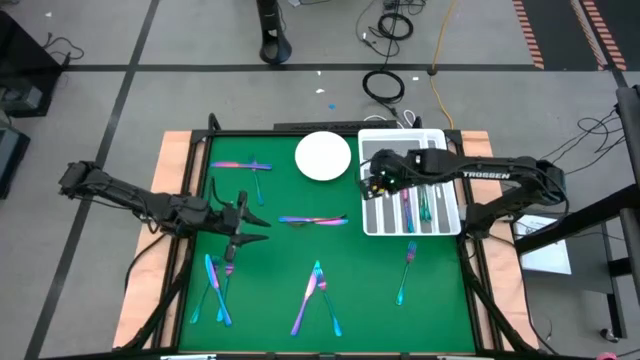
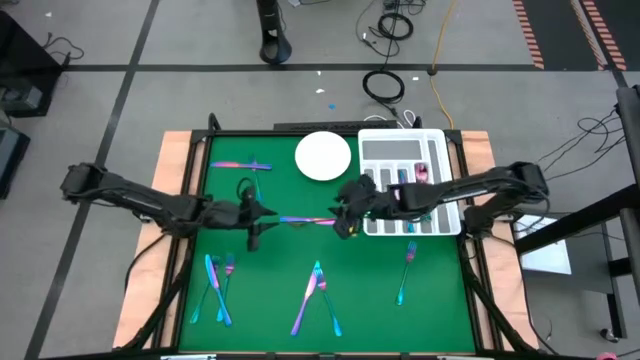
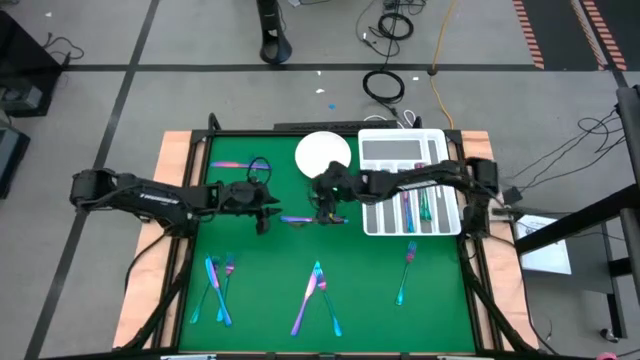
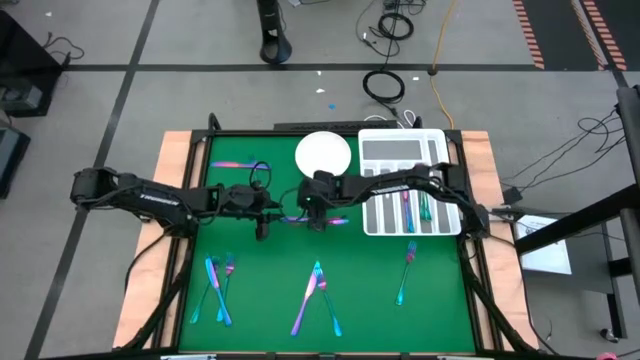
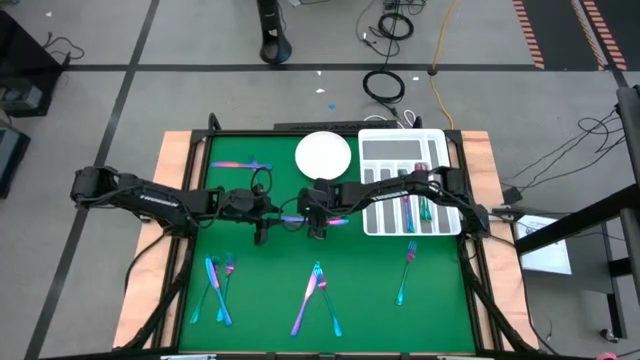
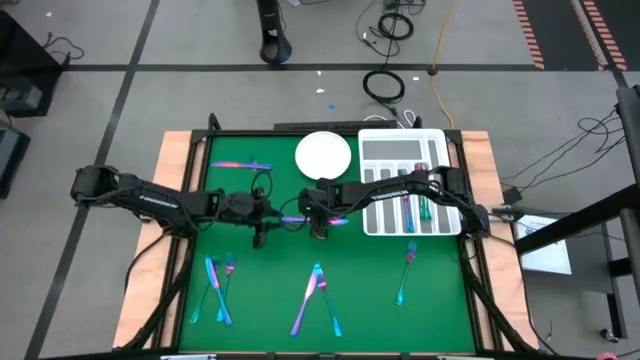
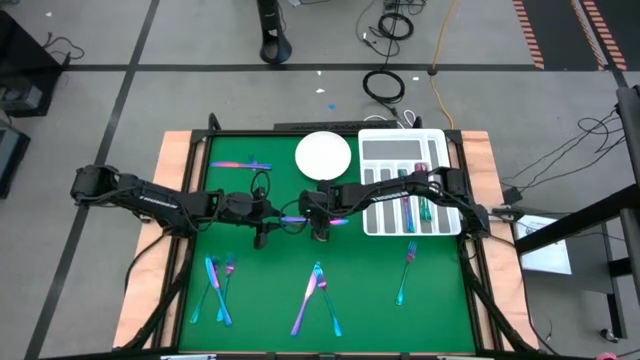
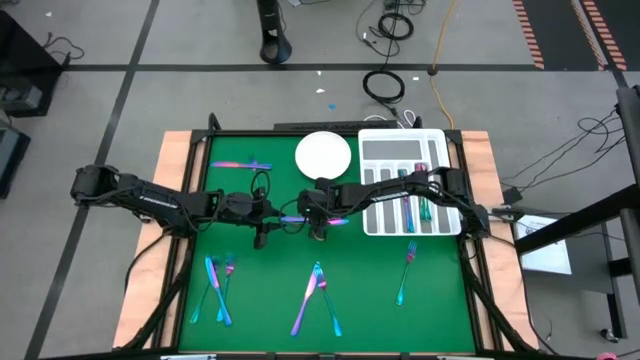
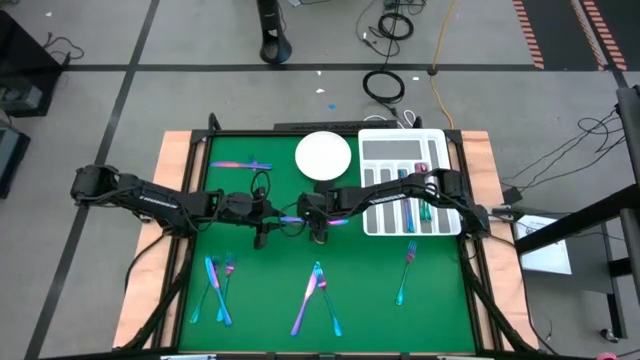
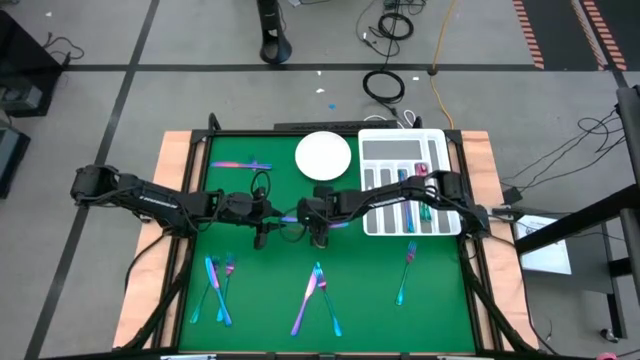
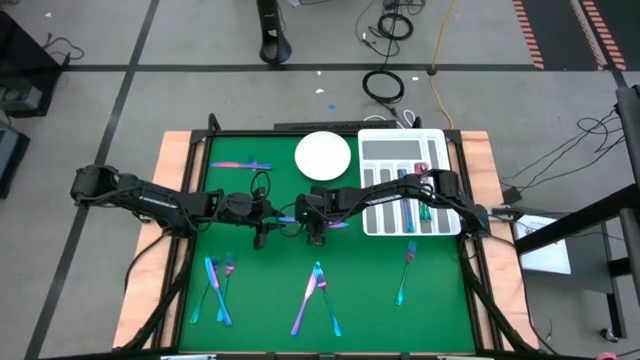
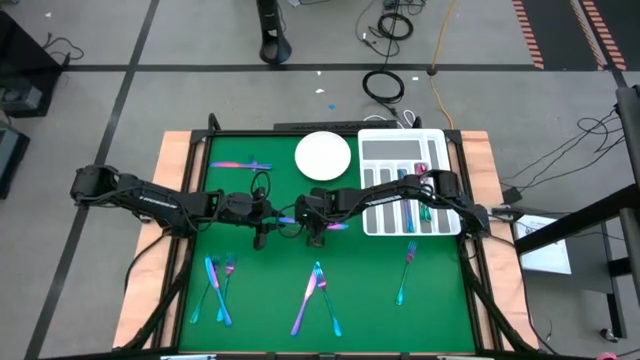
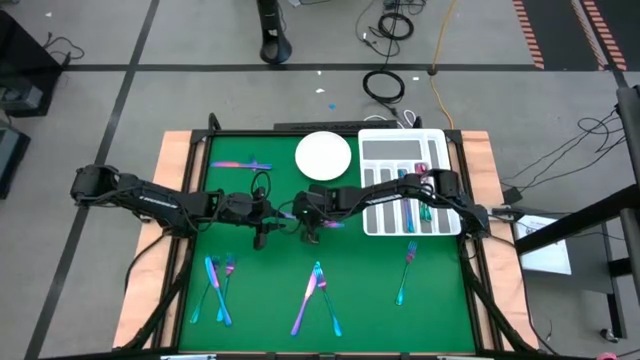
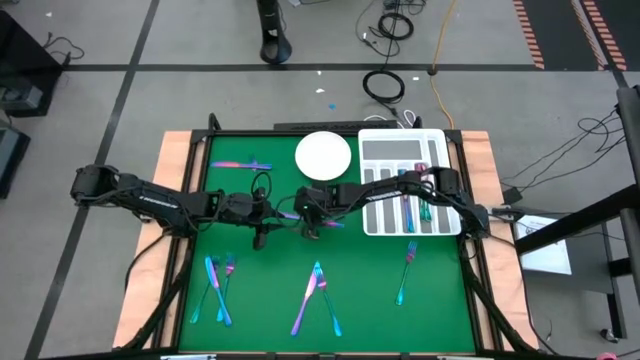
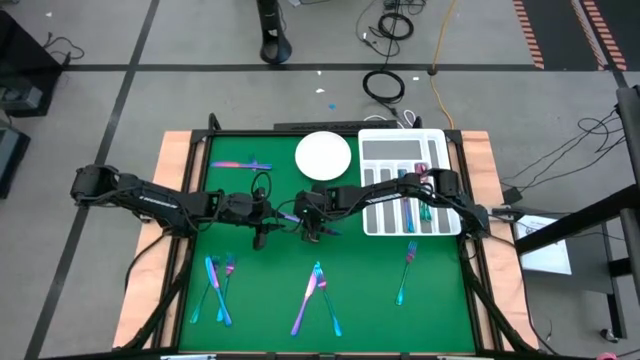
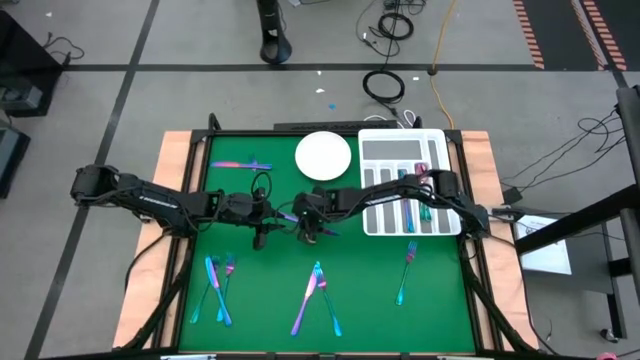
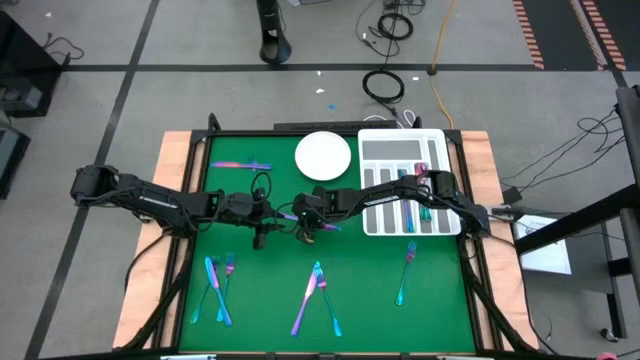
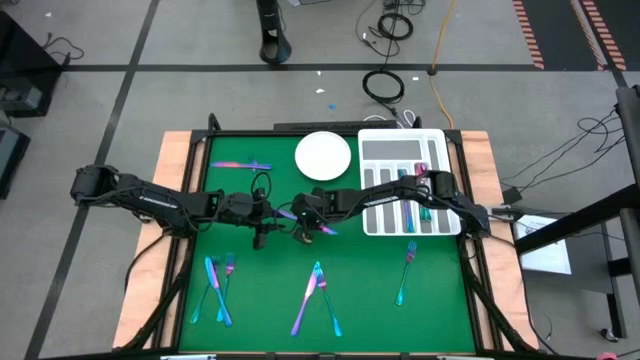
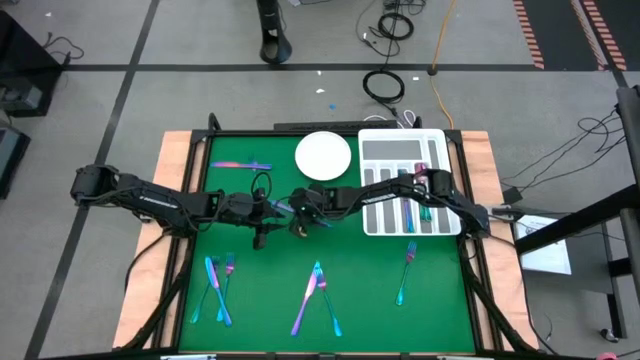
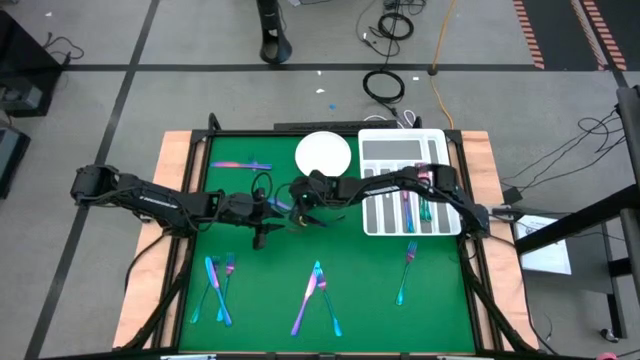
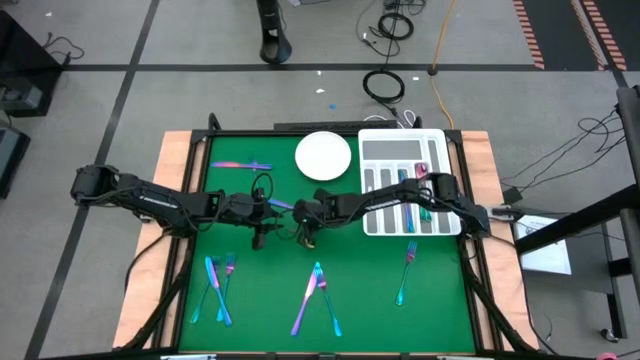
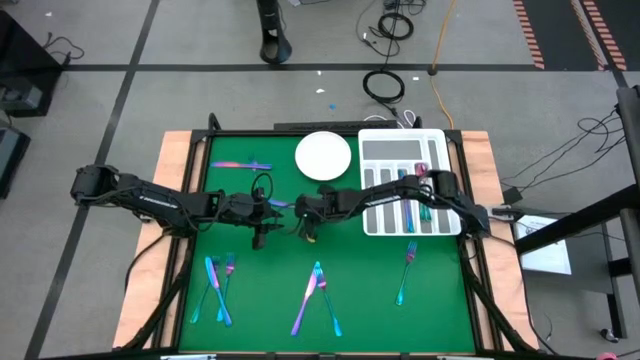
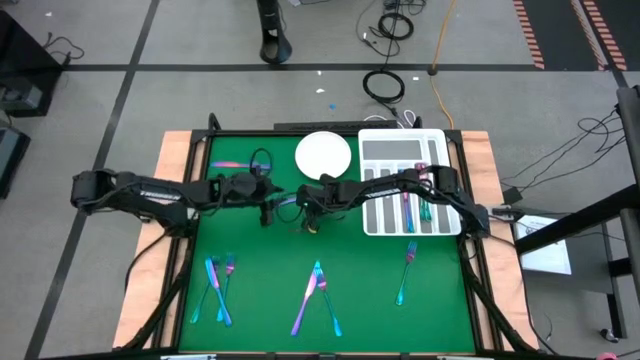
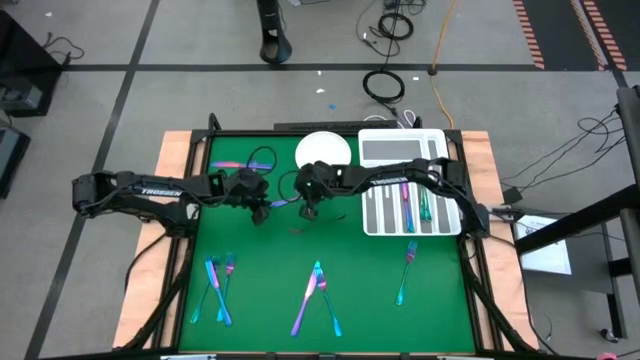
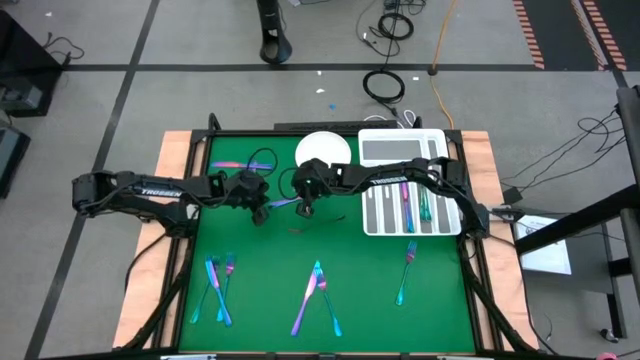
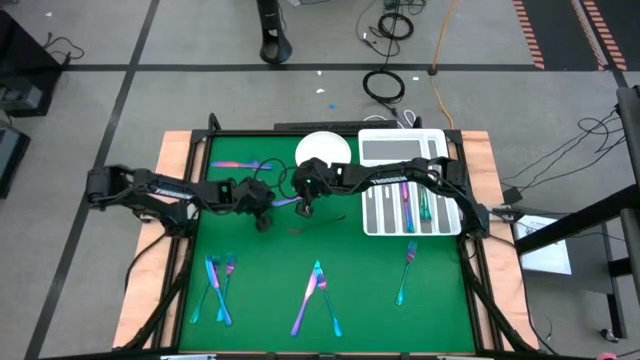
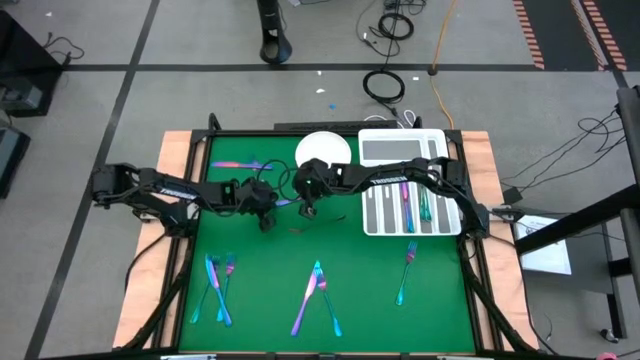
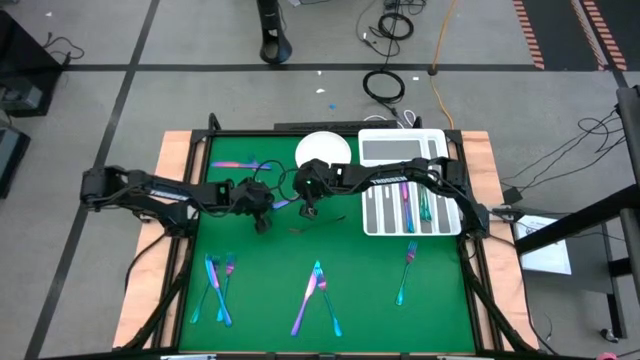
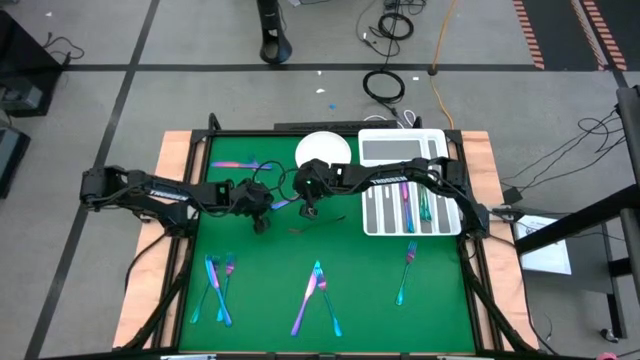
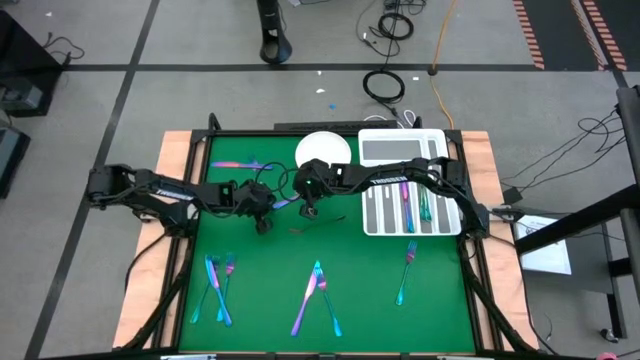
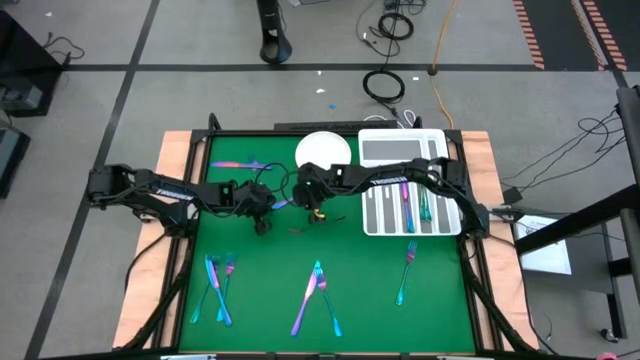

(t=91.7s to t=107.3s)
Task: Sort silverware
Put the iridescent knife into the white silverware tray

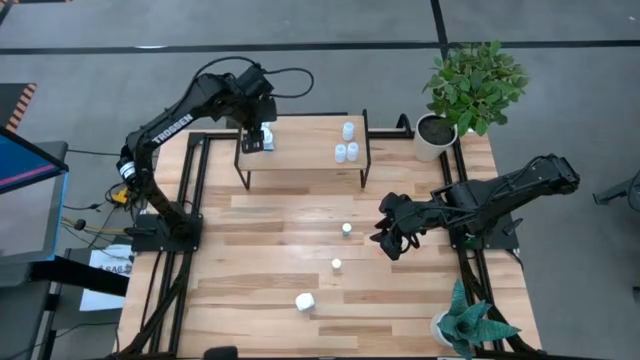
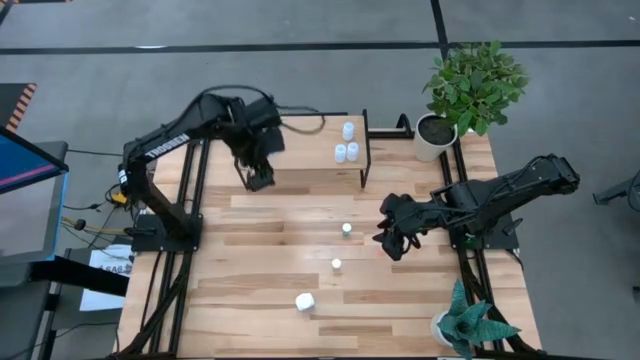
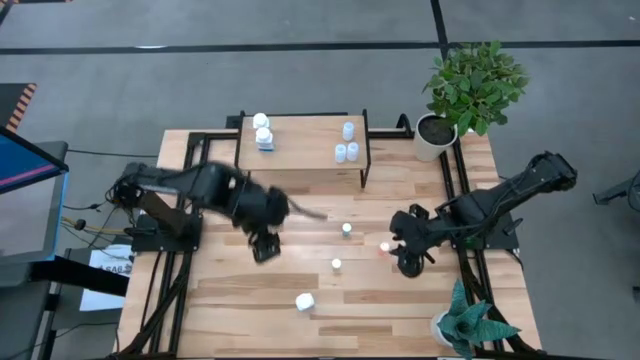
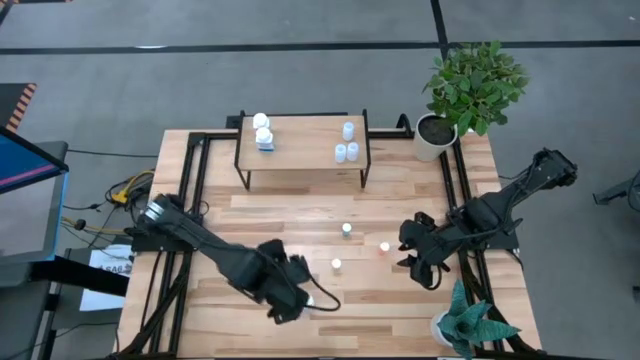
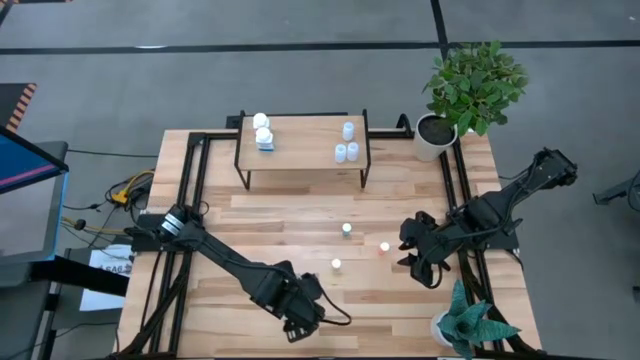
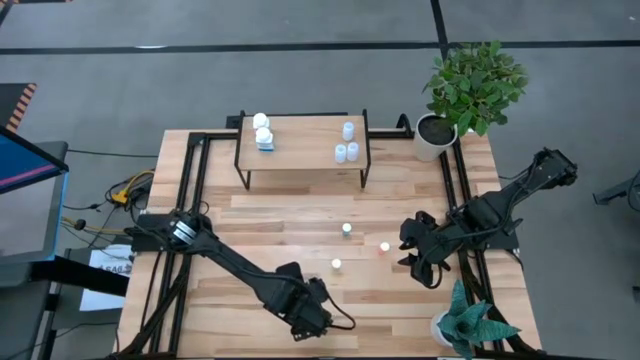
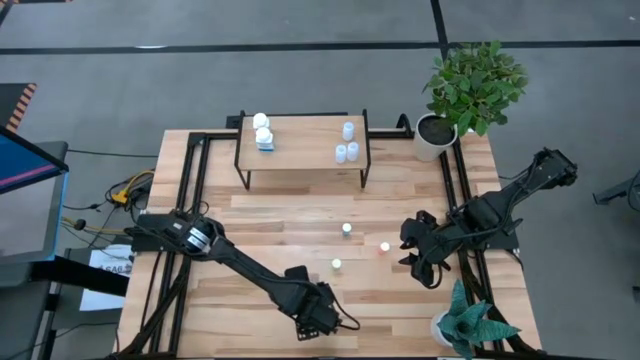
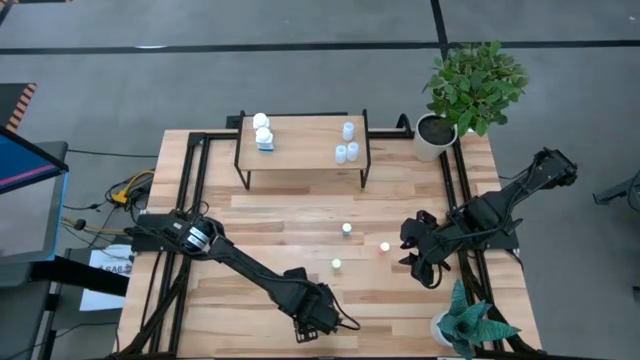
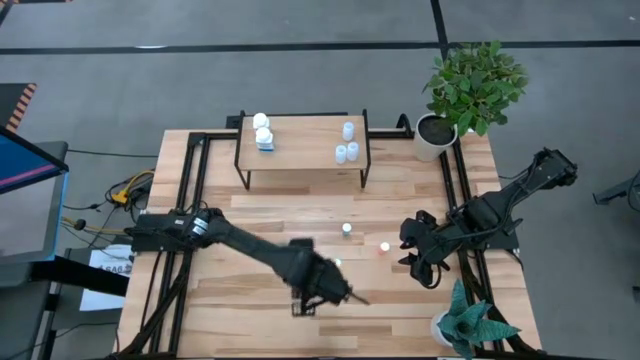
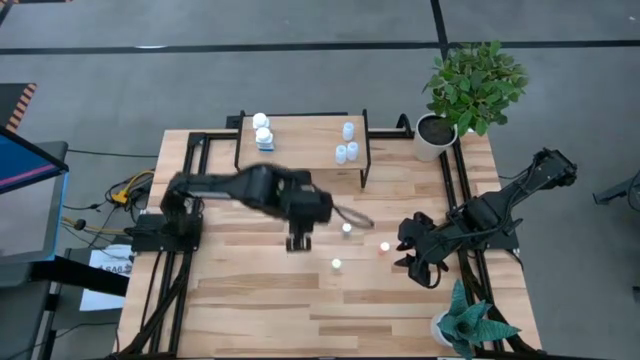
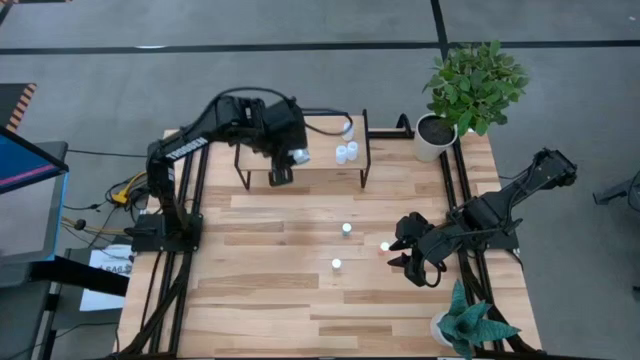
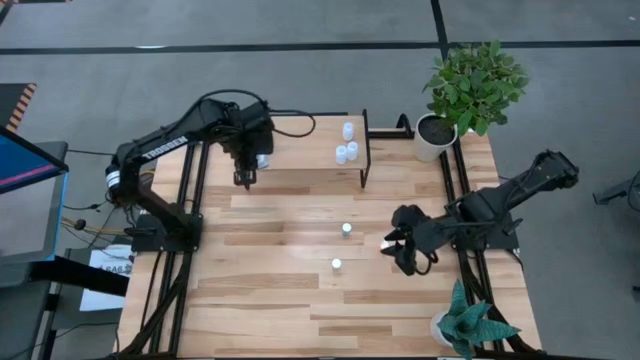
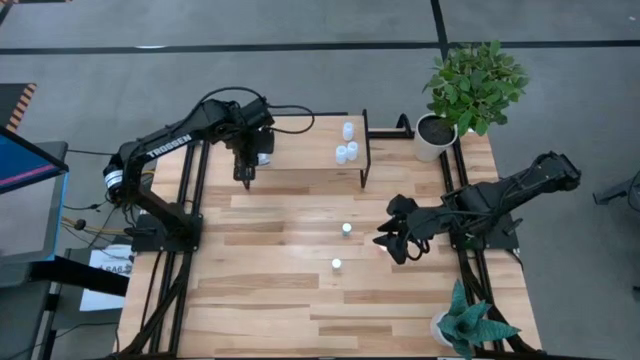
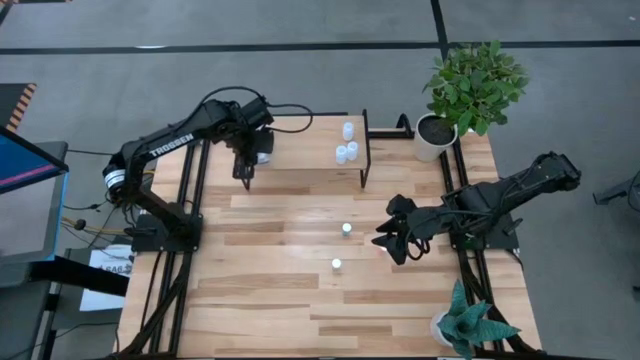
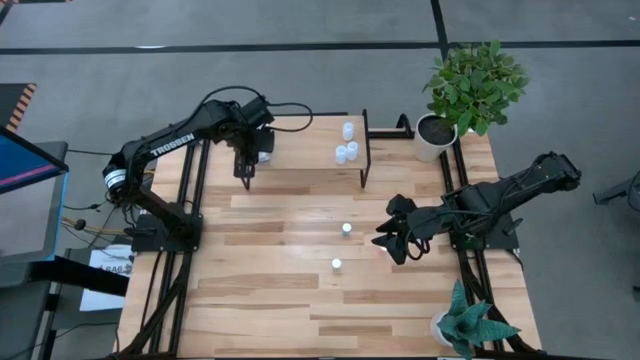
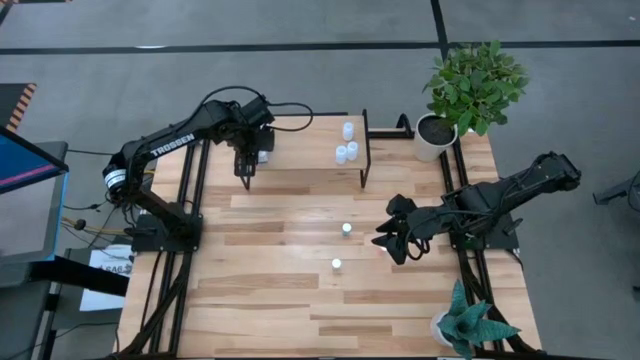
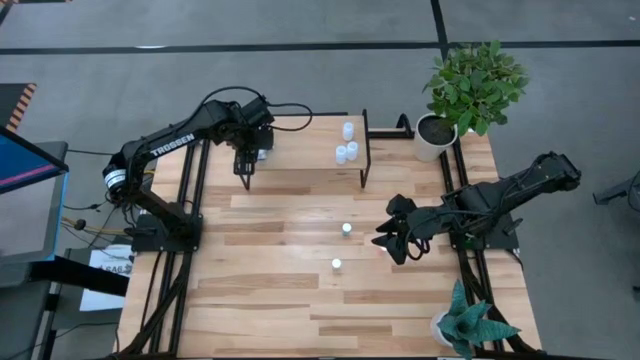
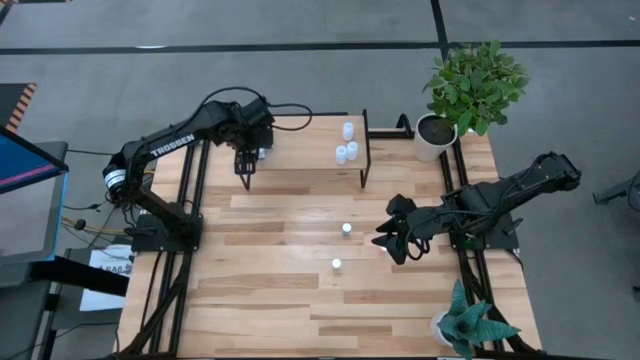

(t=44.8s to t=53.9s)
Task: Pick and place medicine bottles onto shelf by color
Put the white medicine bottle on the shelf aligned with the other white medicine bottles
